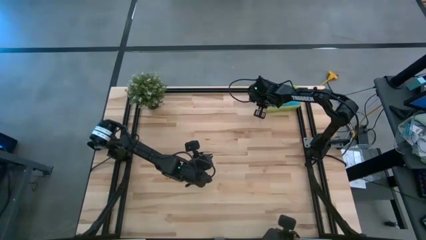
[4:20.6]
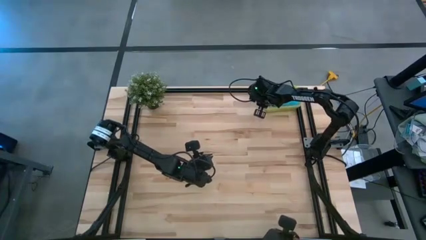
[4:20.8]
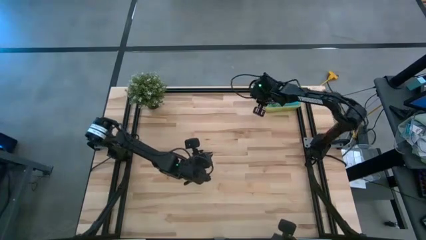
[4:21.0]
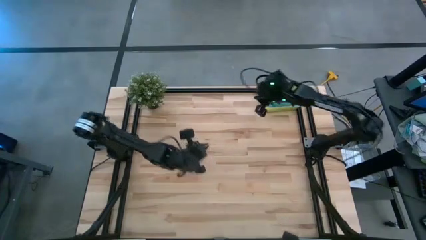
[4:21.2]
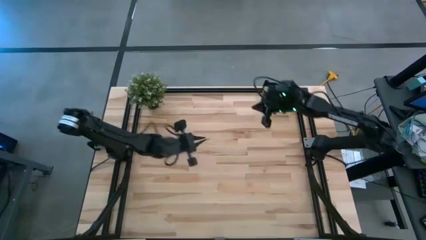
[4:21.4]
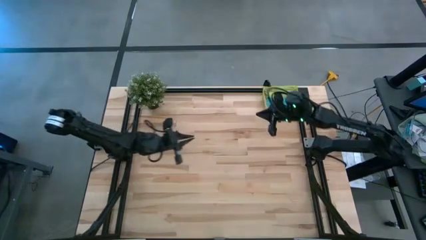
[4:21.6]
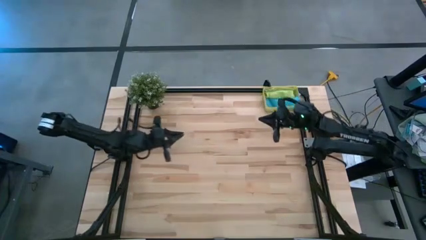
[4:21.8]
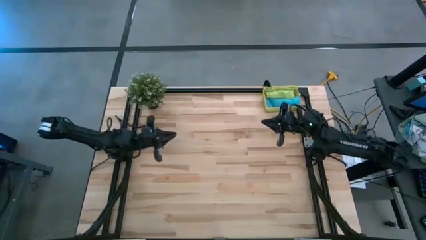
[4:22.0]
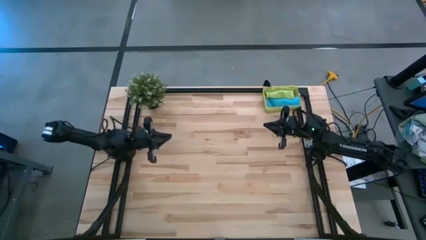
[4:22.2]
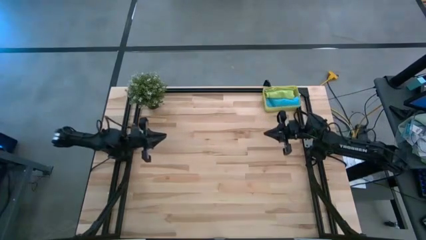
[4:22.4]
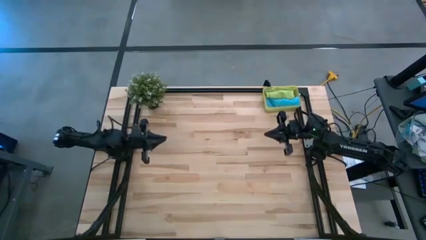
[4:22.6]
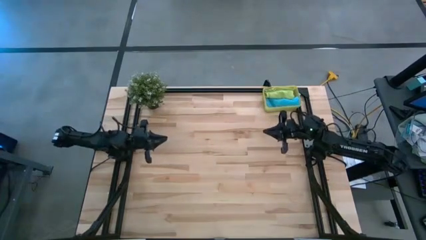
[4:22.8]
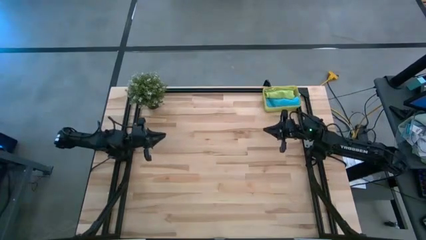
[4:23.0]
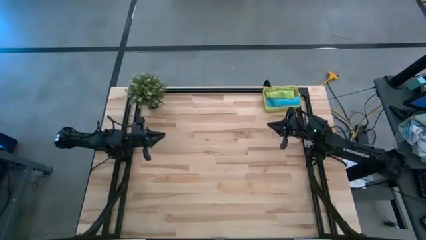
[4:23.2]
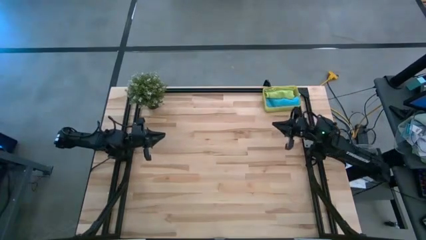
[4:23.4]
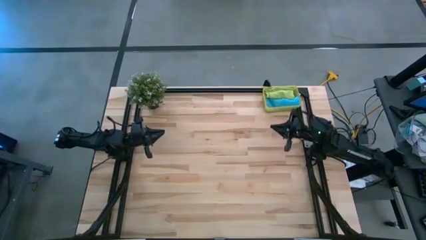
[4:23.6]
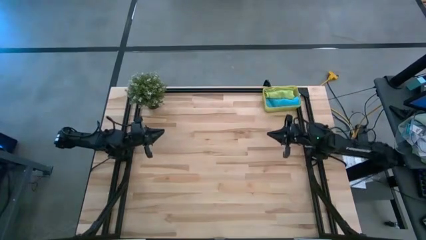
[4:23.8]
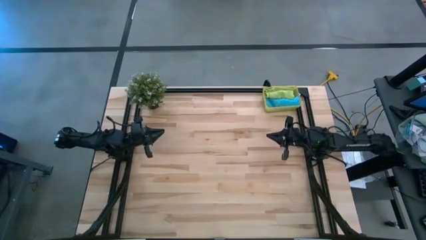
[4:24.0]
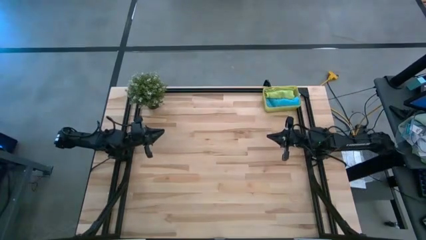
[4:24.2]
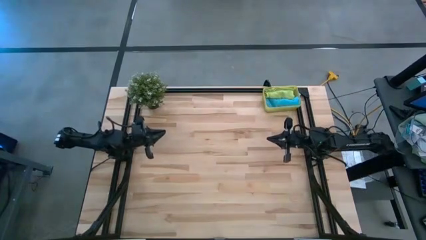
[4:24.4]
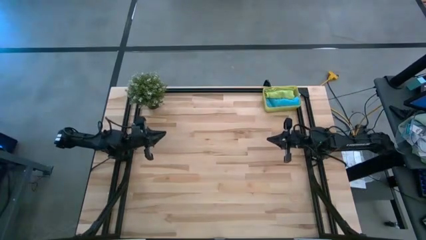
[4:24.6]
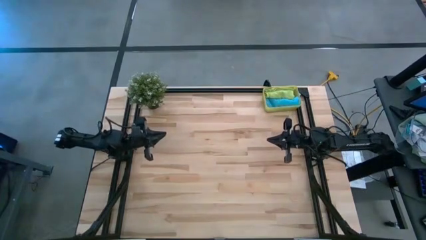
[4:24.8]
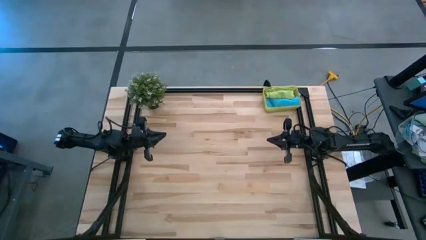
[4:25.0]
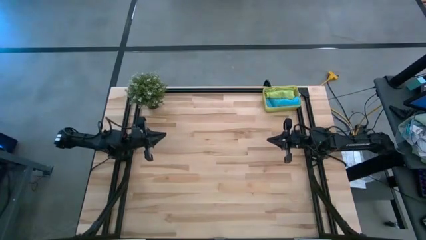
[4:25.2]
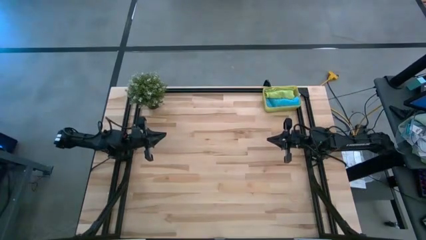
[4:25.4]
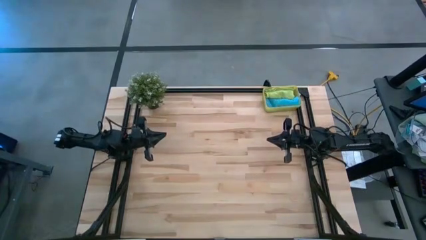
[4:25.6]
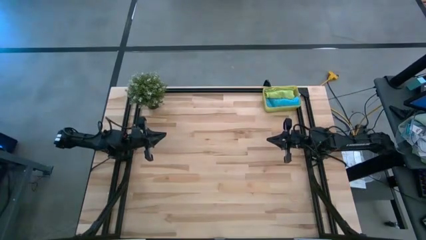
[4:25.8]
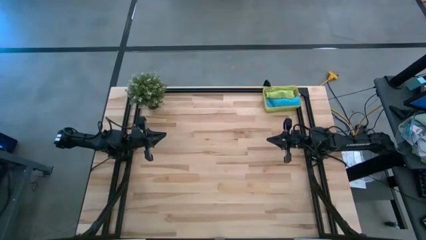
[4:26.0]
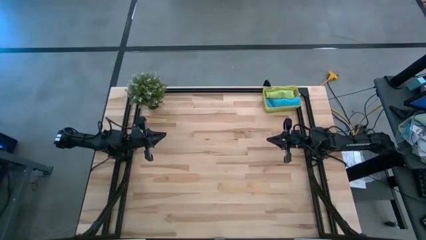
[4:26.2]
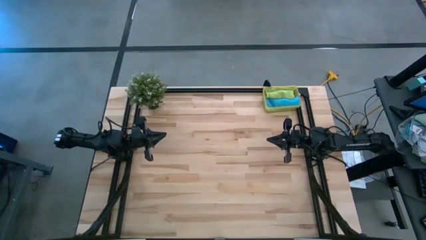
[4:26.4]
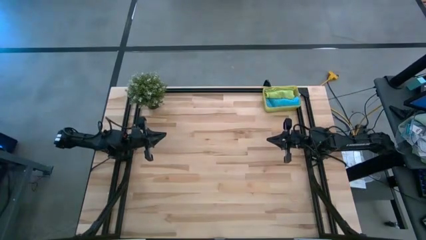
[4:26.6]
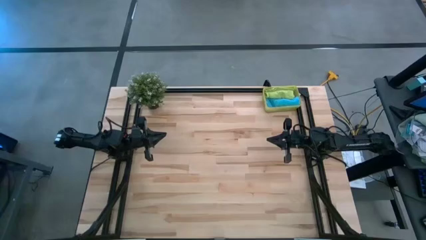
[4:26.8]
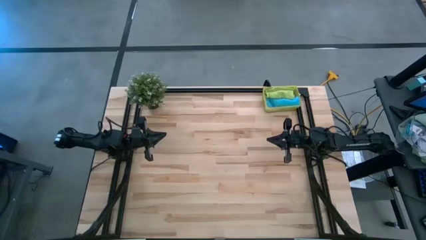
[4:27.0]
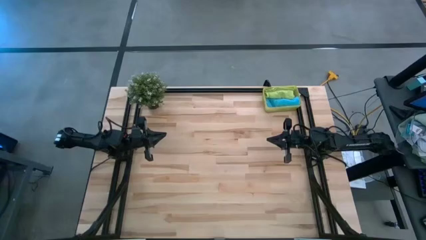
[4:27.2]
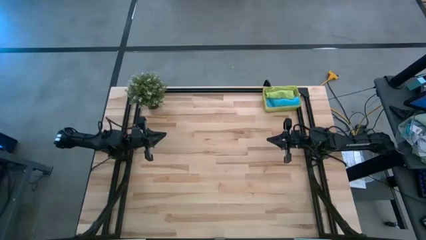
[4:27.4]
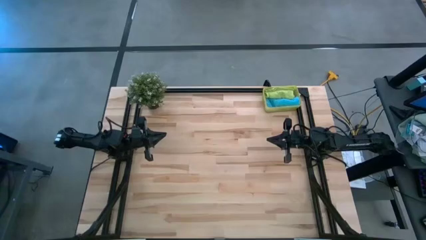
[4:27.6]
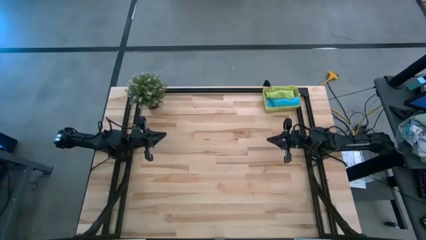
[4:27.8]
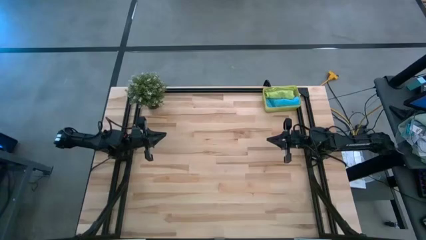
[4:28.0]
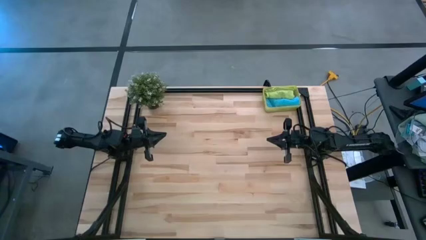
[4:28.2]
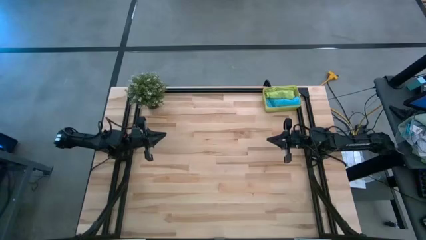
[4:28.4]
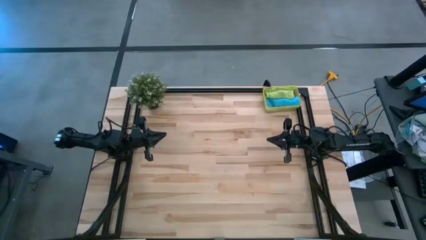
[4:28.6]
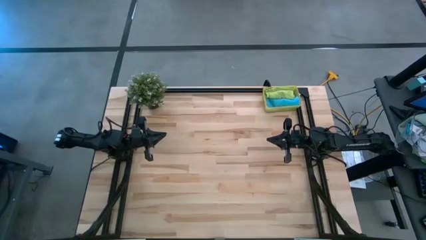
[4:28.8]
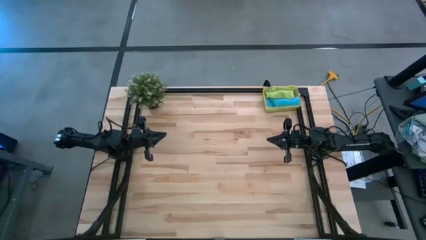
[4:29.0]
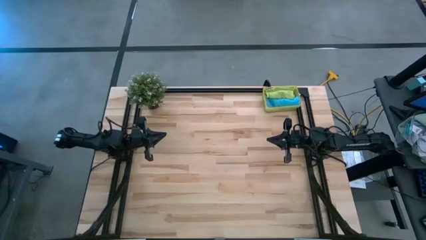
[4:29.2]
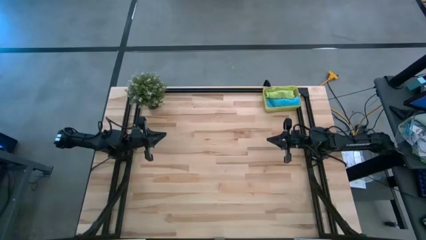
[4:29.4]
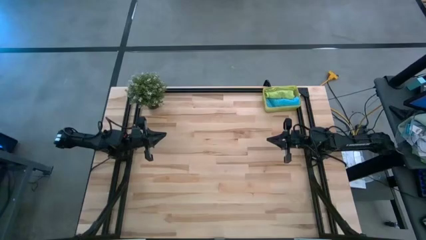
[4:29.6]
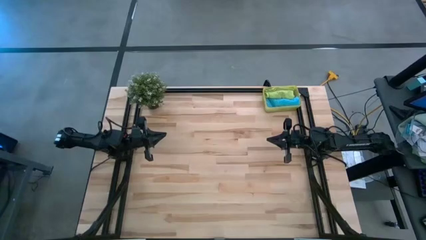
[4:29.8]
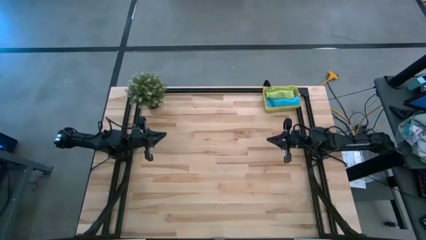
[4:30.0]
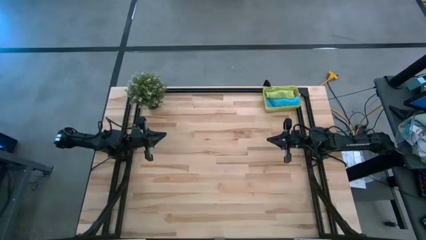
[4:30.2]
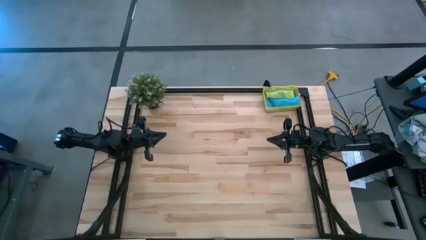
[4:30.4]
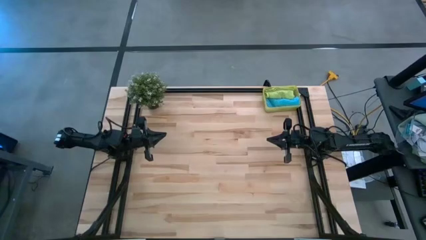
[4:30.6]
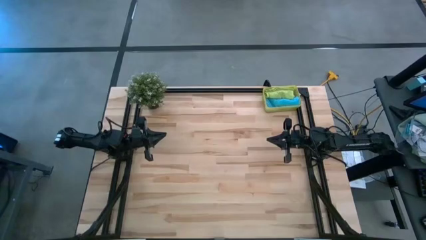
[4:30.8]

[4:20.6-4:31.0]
Task: Roll microfiber towels into tight, uniform cylinder then place into a basket
Return to home position
